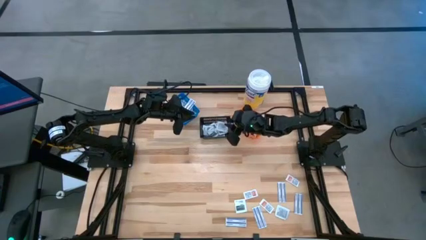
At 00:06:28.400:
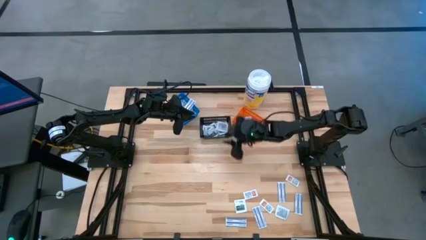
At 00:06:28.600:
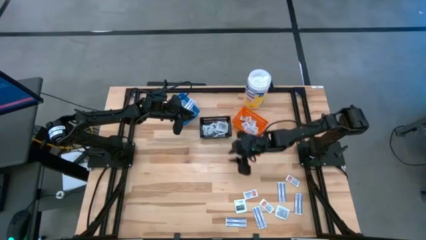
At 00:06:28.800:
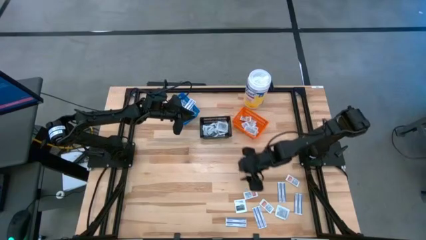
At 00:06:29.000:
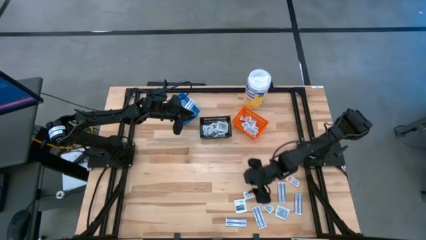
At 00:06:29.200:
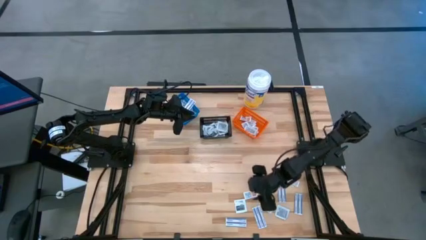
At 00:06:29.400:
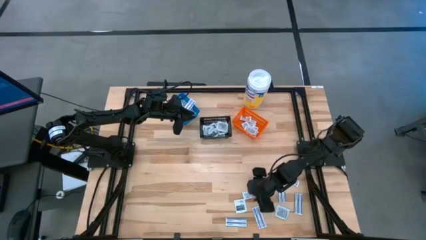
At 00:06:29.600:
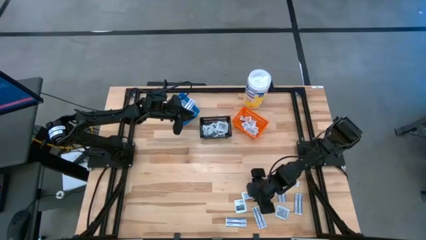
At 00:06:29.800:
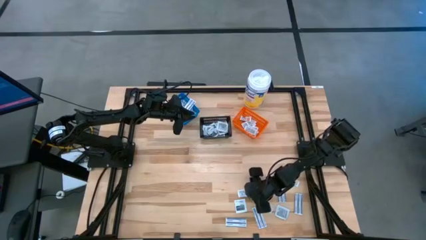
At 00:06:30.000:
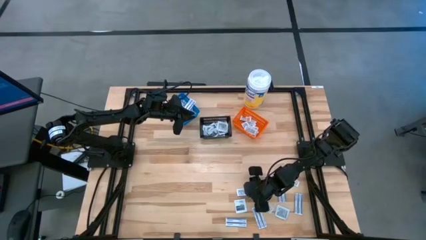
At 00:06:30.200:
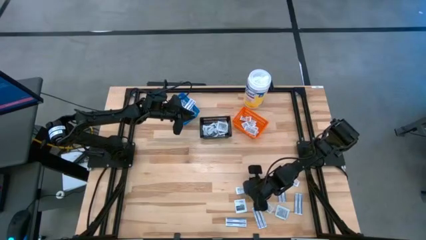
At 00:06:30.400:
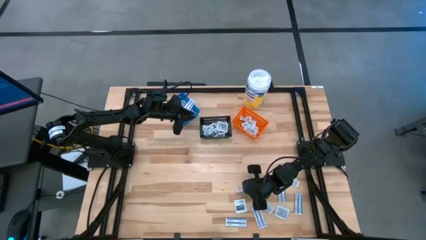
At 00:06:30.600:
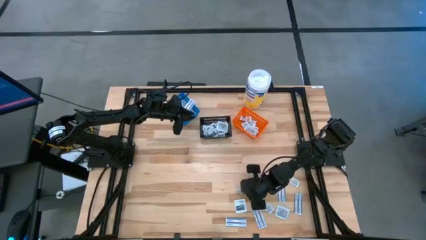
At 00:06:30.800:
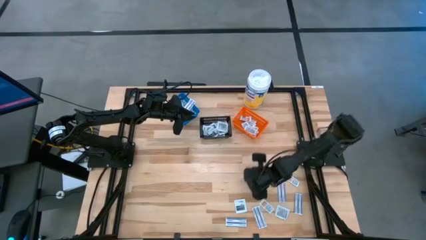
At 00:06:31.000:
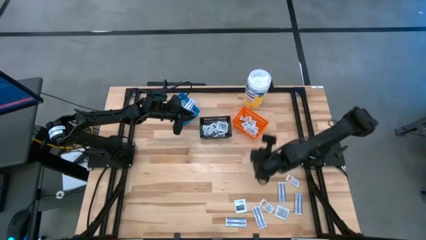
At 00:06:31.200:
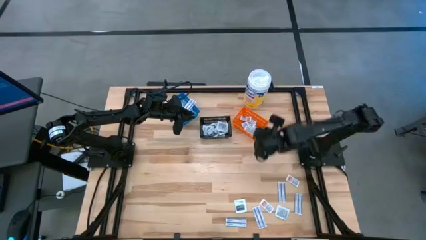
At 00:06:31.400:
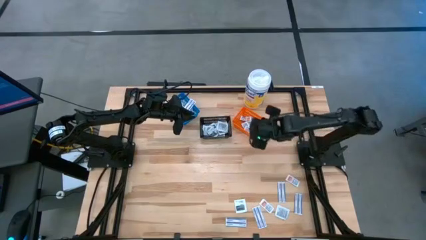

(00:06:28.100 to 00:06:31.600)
Task: Pick & Place First Aid Supplies
Put the ointment pack into the orange bin

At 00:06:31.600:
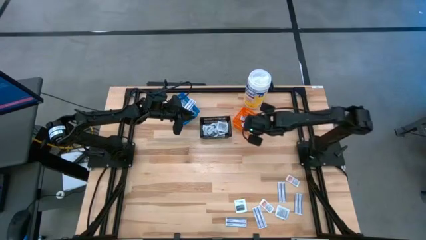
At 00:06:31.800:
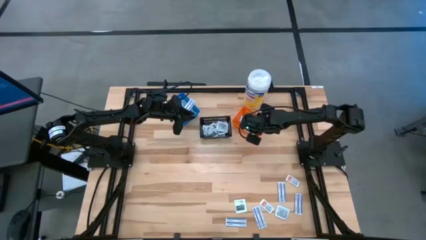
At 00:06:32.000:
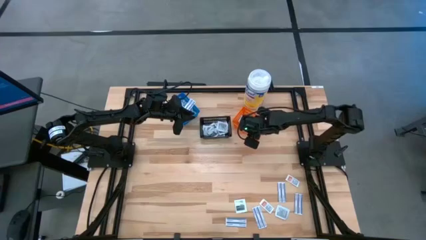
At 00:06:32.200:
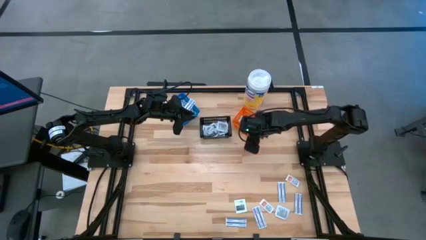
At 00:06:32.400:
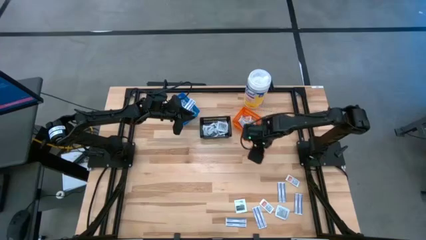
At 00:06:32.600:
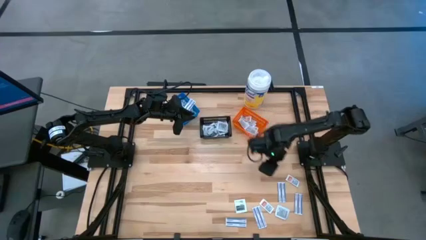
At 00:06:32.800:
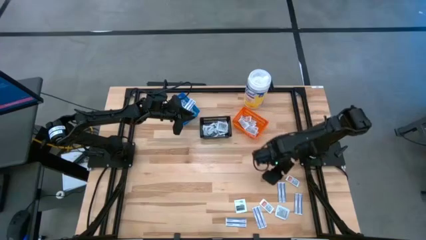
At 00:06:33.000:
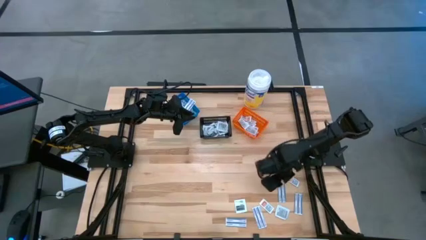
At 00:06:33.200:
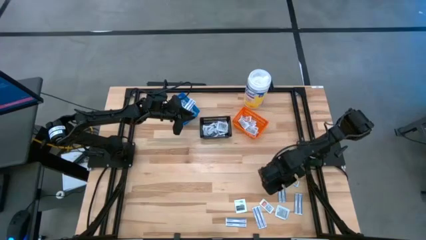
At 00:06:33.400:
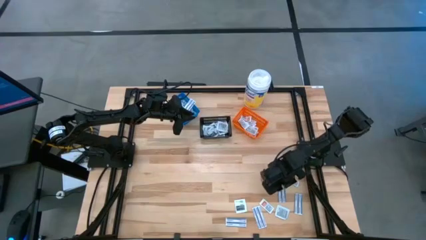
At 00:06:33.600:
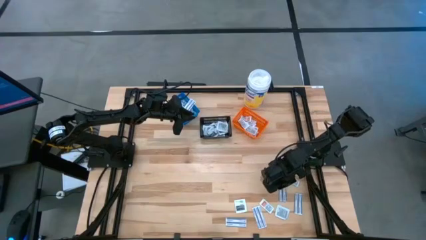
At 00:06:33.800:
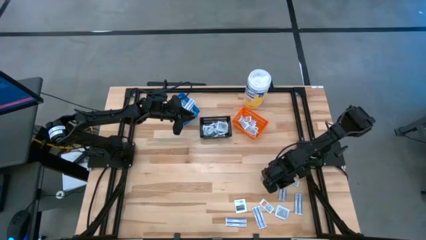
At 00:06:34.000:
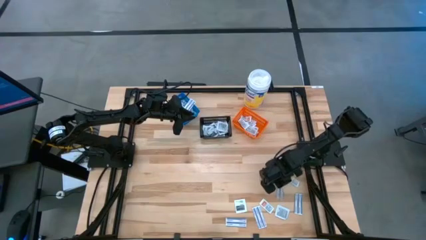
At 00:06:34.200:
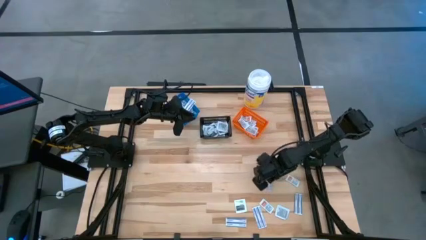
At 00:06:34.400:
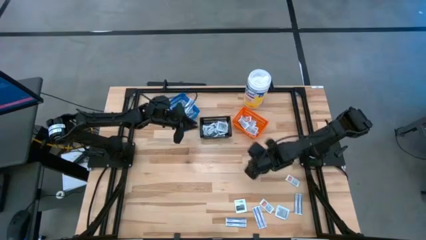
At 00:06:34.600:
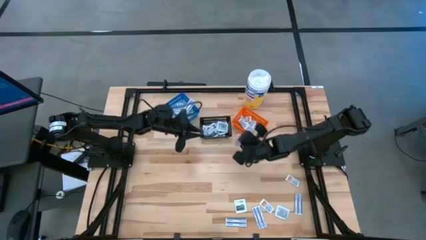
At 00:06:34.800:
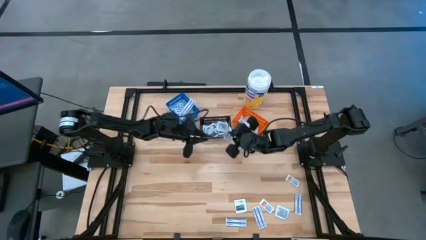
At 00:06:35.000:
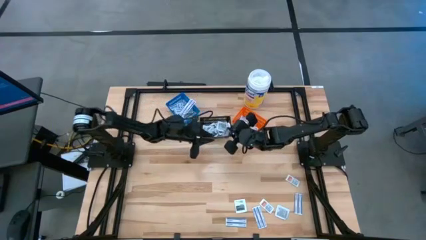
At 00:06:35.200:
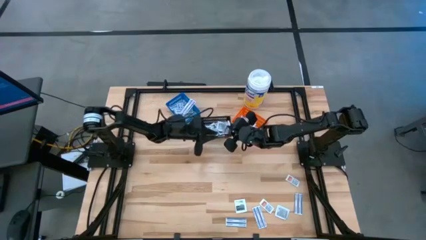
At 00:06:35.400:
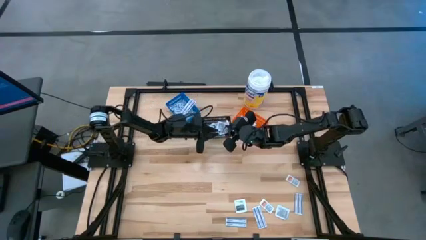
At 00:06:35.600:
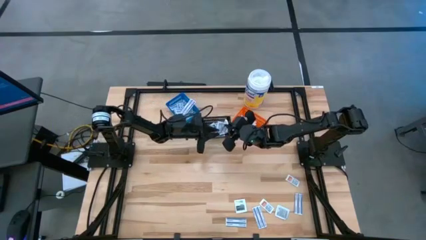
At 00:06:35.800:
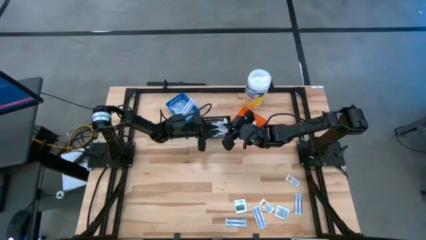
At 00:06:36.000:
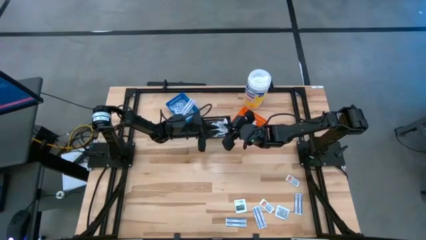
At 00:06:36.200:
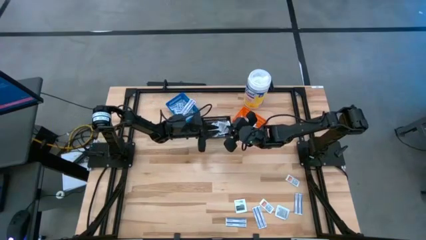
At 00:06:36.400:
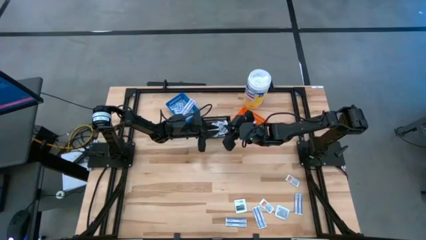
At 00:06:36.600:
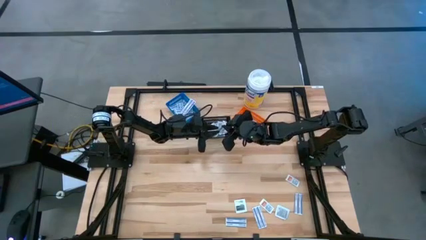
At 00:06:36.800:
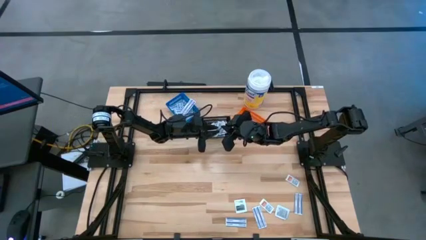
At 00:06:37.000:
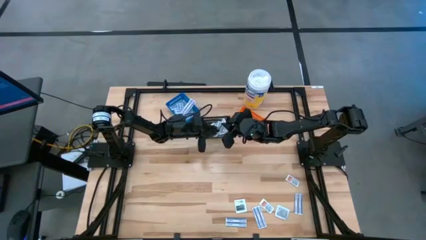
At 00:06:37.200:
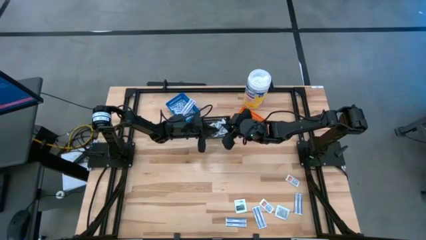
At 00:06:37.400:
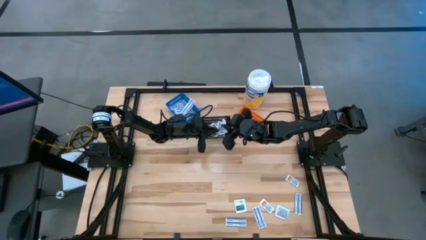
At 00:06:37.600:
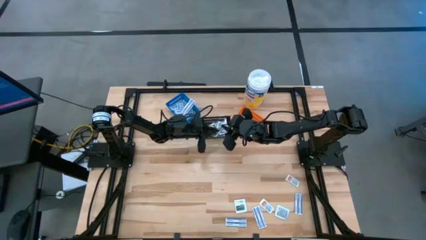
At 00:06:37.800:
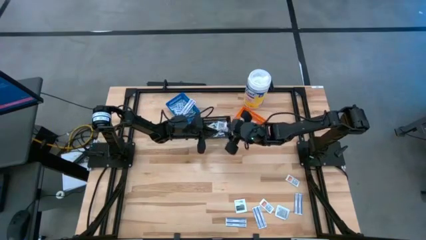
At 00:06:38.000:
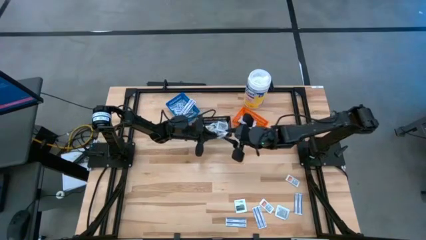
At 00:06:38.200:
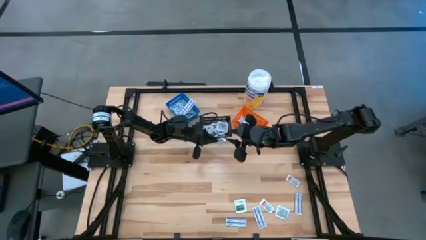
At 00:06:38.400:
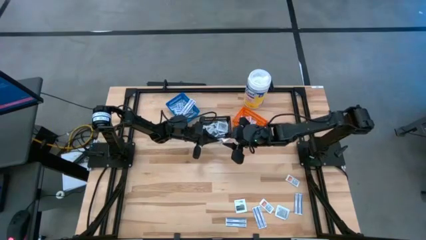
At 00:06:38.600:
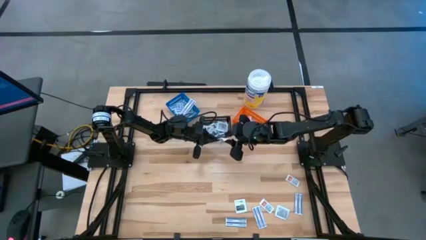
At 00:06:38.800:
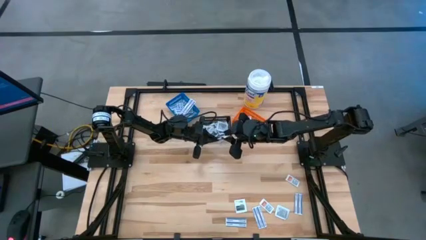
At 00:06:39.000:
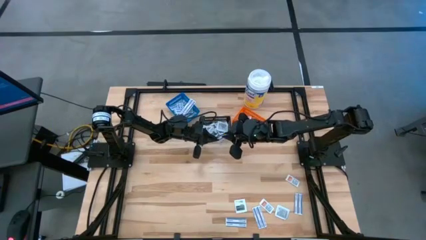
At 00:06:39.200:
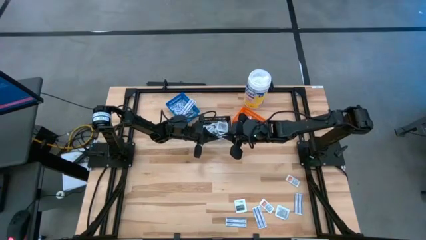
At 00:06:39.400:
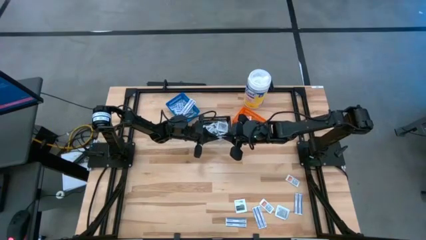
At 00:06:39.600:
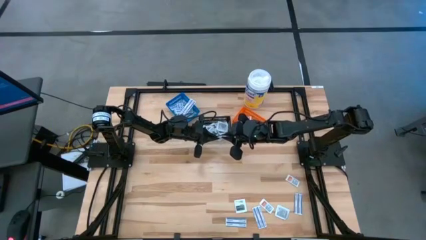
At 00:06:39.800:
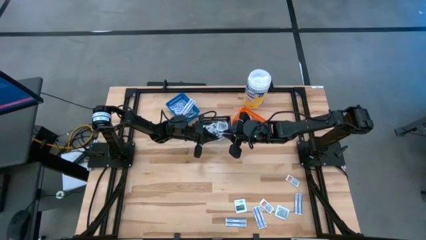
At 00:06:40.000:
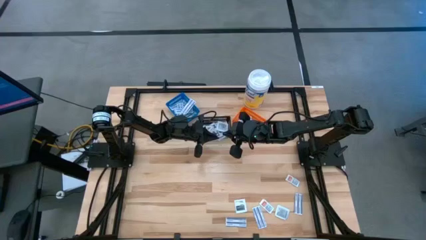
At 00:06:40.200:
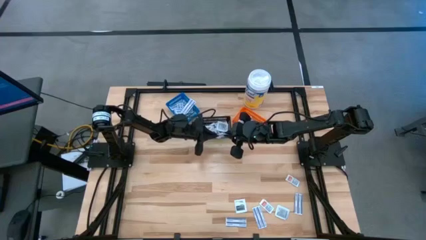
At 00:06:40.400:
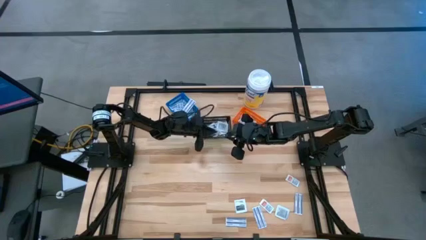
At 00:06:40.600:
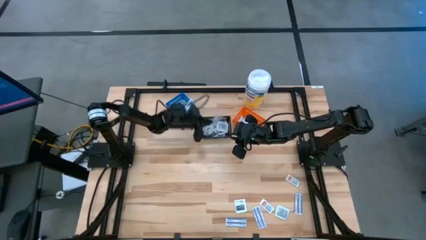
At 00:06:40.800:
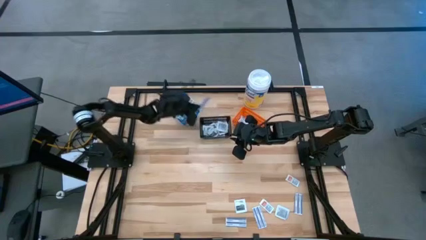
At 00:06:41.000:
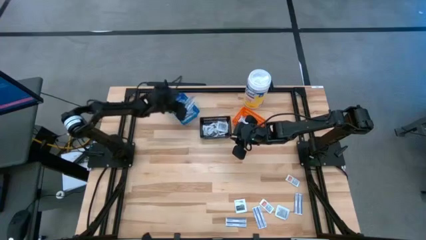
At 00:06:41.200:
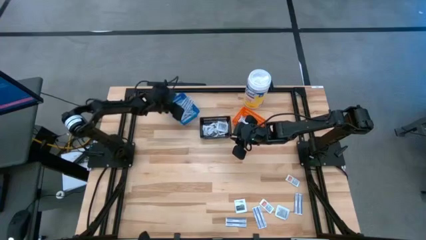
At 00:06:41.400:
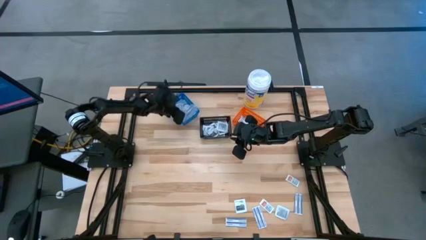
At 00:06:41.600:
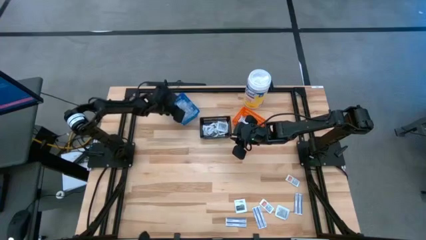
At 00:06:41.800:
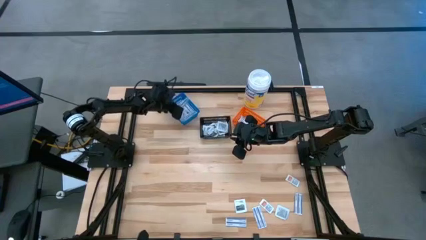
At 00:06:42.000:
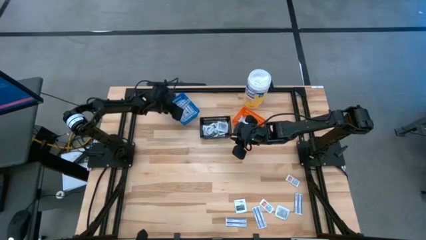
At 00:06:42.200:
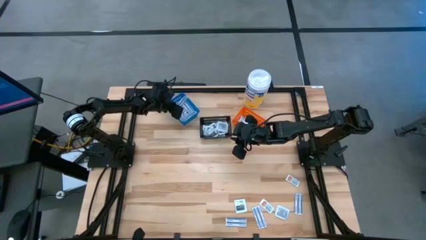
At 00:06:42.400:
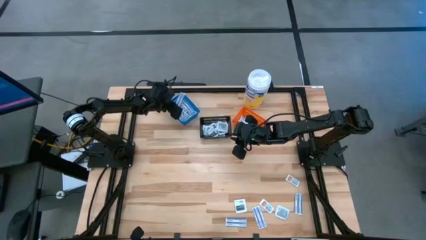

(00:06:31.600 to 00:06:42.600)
Put the bandage into the blue container

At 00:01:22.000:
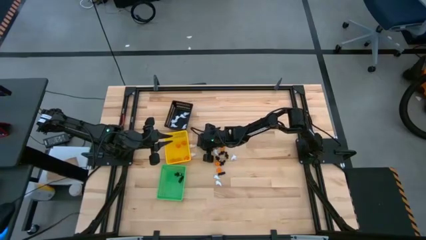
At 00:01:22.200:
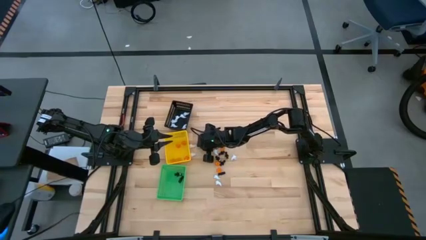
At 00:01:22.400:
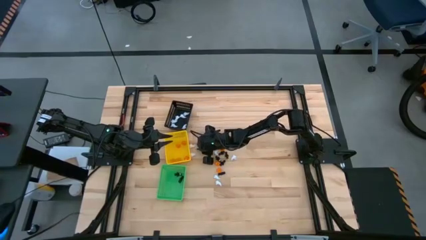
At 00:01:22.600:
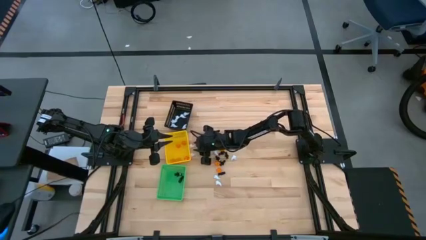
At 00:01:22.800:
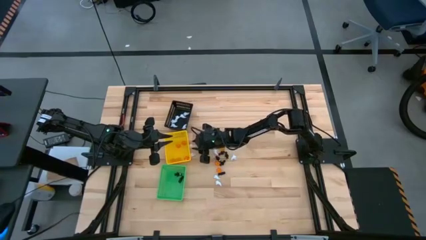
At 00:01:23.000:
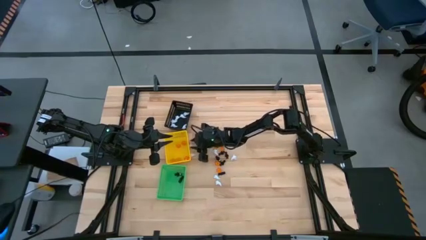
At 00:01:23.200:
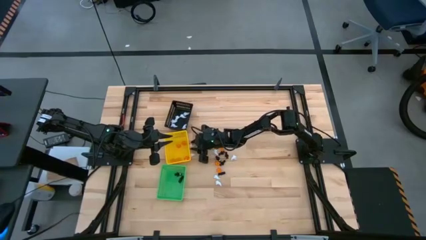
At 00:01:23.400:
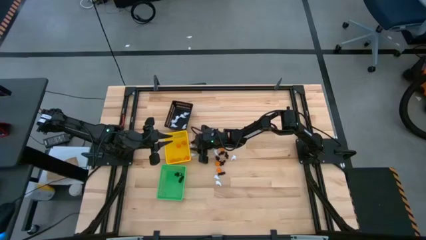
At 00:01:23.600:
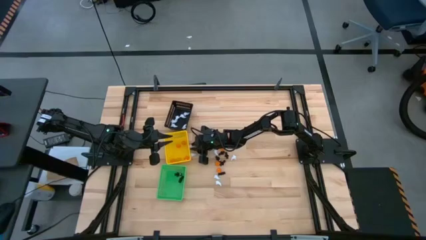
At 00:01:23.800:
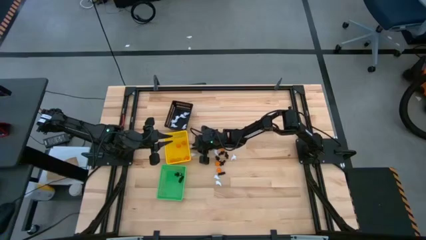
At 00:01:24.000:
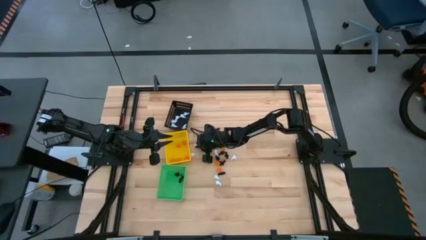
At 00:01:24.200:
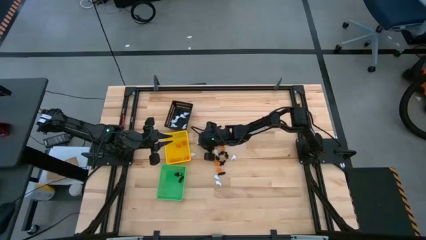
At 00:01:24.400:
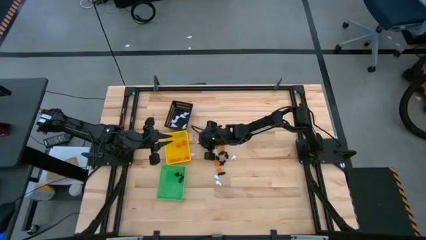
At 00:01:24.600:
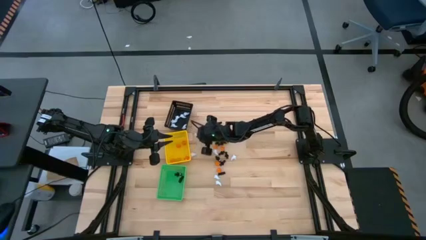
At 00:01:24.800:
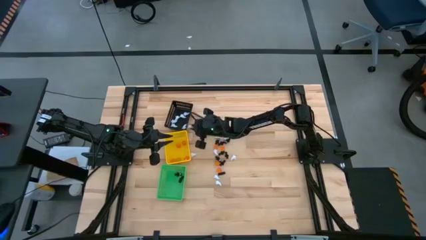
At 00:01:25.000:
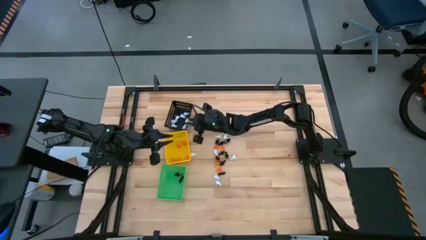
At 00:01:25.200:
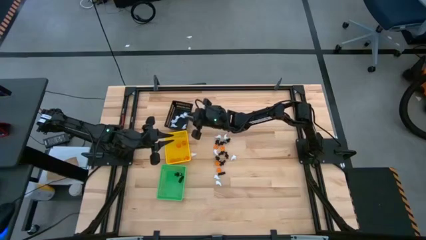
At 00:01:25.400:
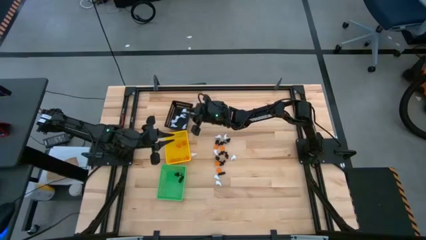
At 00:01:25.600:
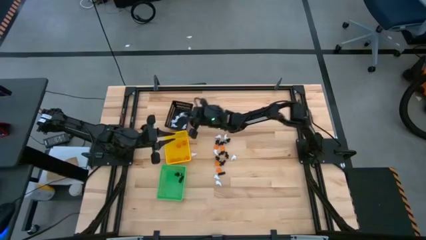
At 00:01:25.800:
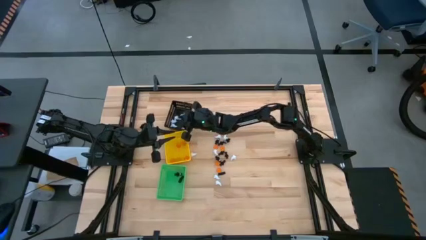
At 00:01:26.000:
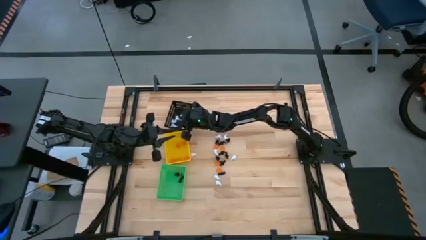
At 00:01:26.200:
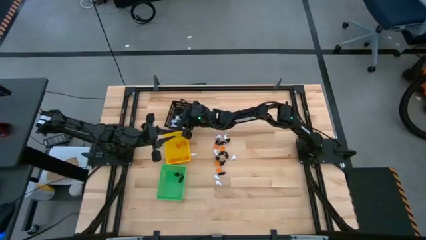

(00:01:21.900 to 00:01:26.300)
Task: Sort Halloween decoration
Put the white ghost plush toy into the black basket
